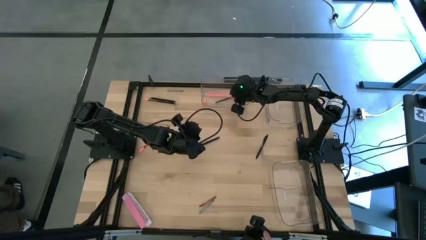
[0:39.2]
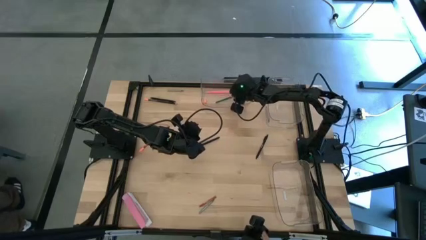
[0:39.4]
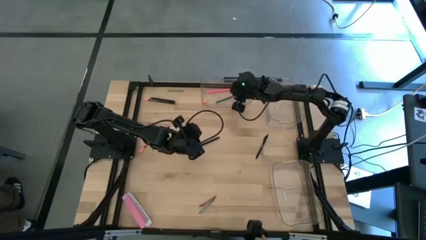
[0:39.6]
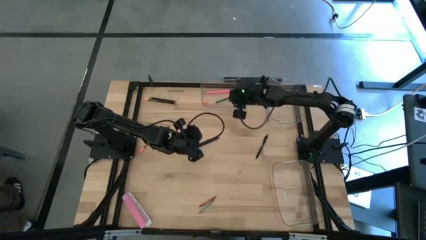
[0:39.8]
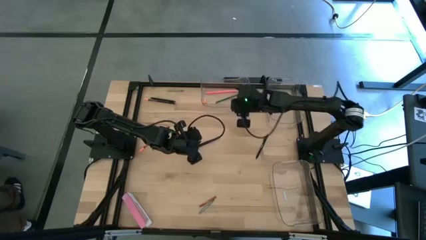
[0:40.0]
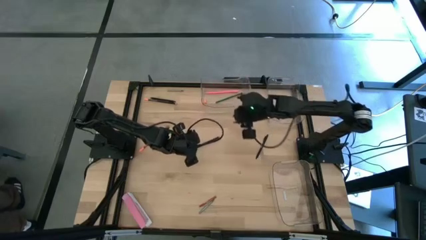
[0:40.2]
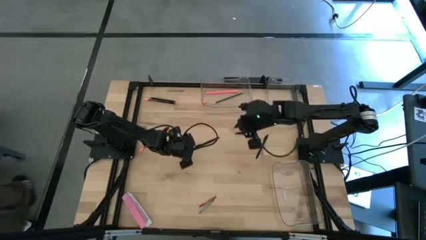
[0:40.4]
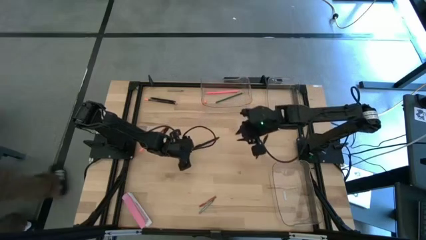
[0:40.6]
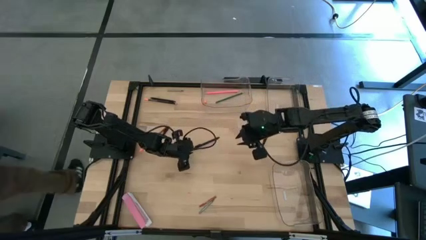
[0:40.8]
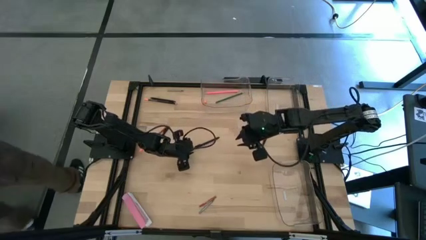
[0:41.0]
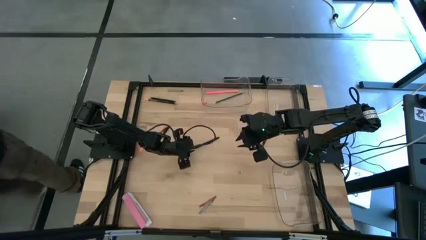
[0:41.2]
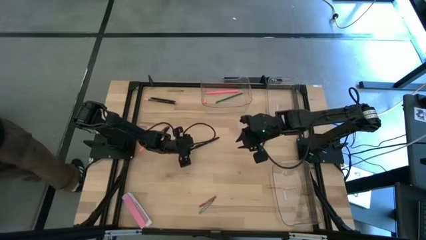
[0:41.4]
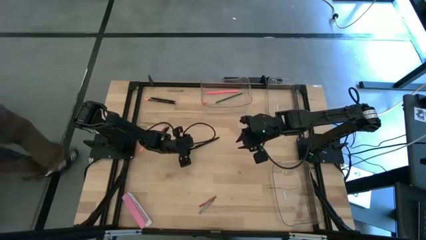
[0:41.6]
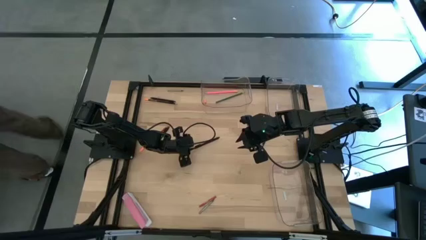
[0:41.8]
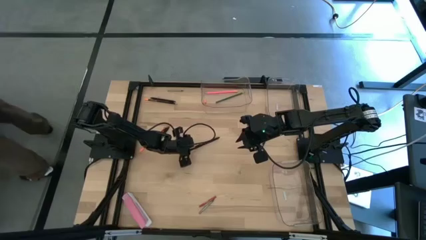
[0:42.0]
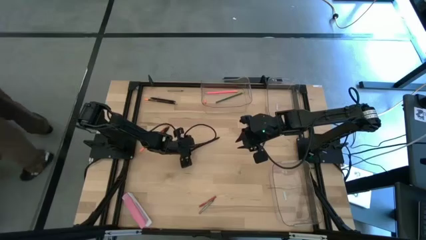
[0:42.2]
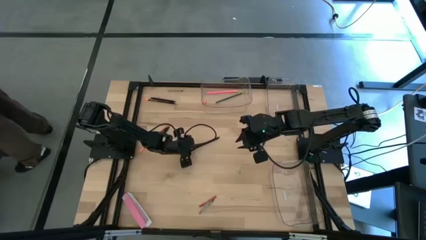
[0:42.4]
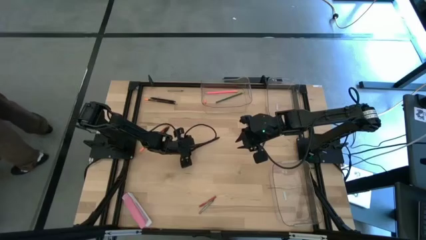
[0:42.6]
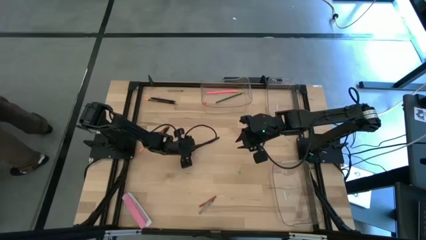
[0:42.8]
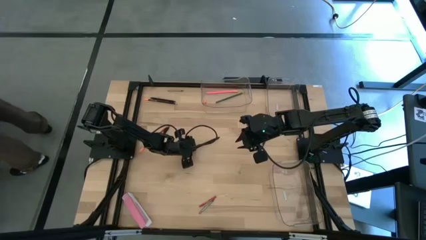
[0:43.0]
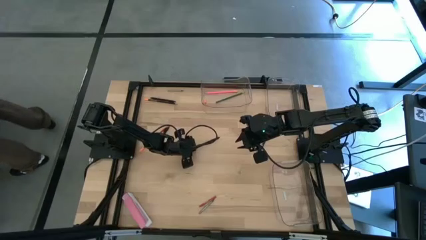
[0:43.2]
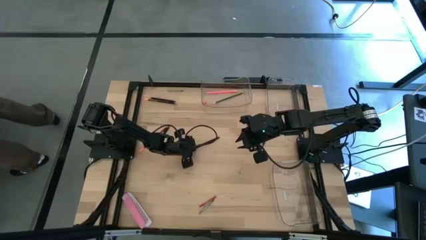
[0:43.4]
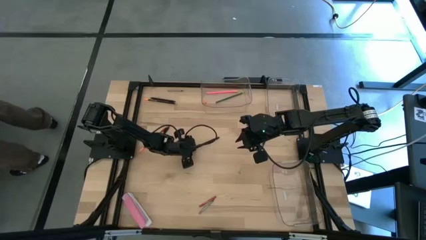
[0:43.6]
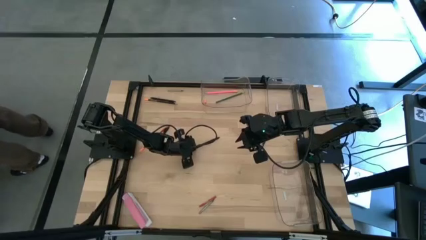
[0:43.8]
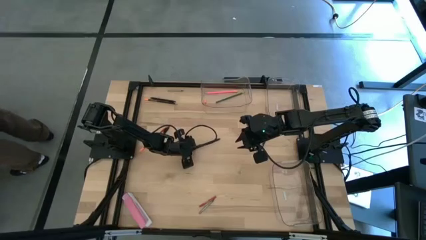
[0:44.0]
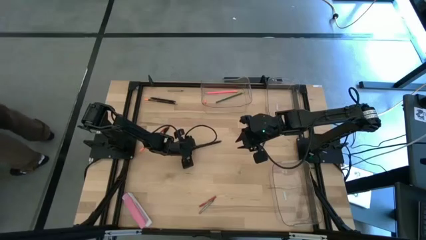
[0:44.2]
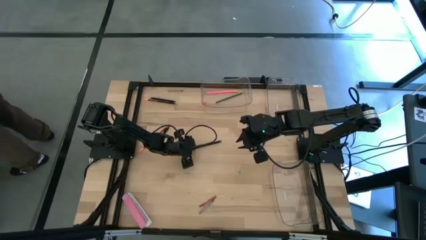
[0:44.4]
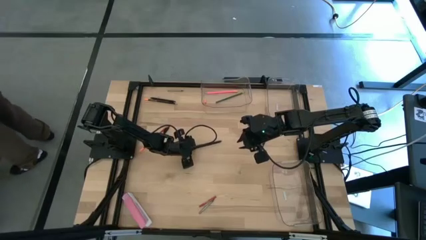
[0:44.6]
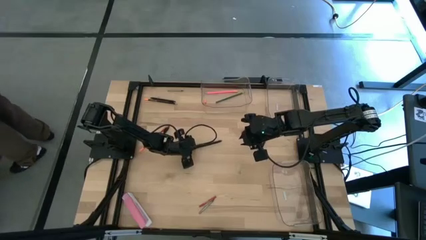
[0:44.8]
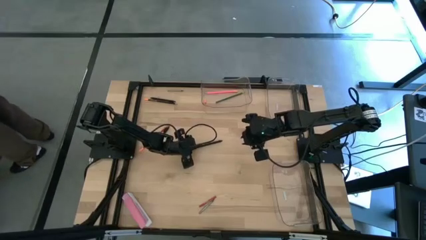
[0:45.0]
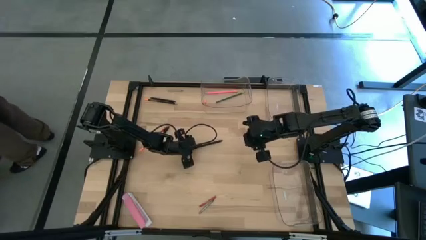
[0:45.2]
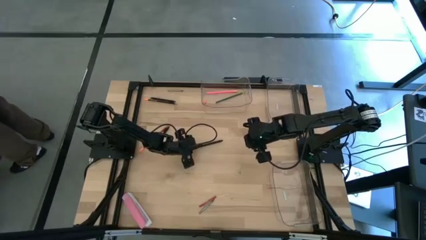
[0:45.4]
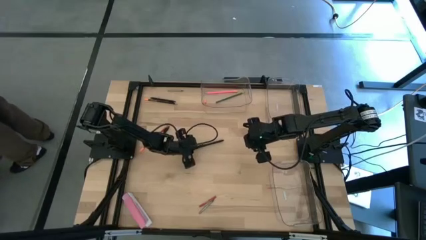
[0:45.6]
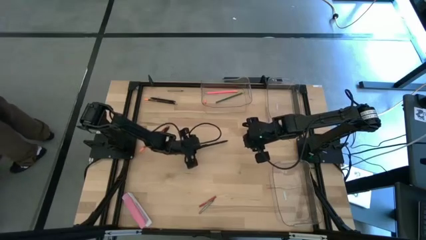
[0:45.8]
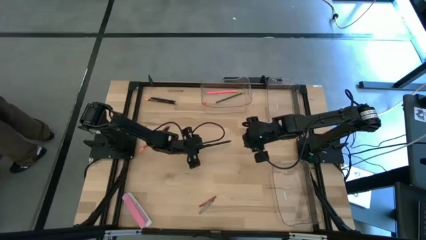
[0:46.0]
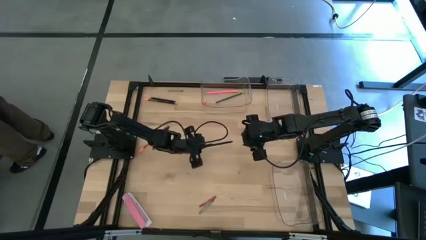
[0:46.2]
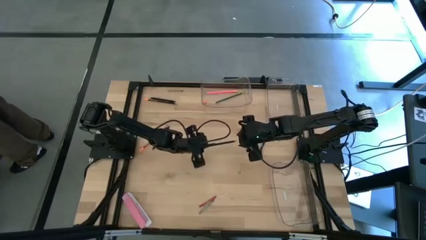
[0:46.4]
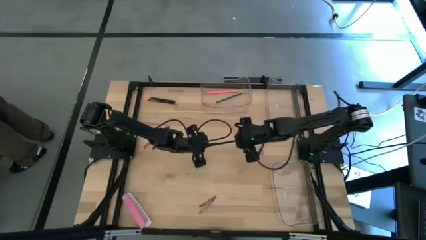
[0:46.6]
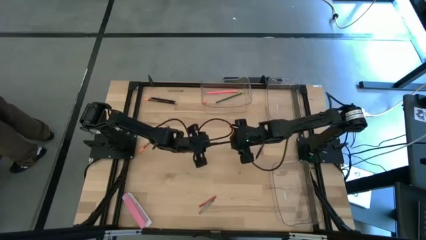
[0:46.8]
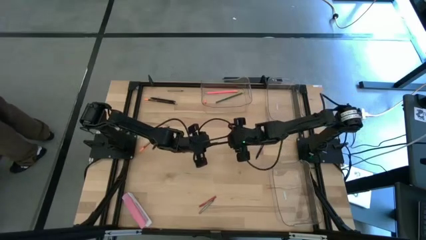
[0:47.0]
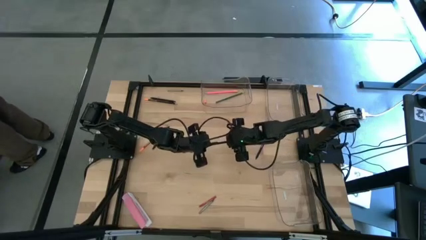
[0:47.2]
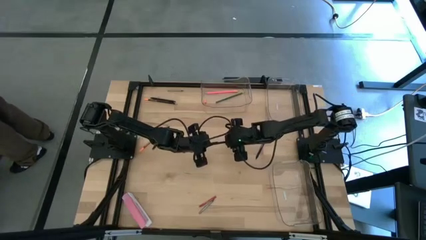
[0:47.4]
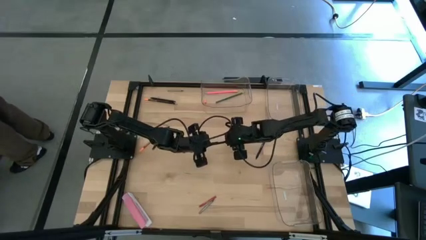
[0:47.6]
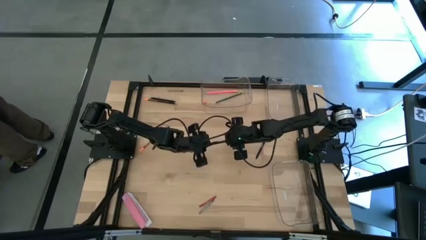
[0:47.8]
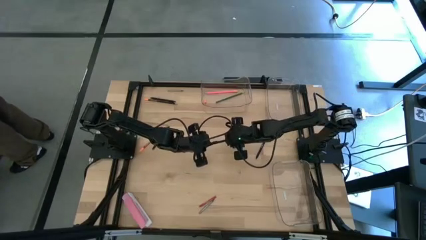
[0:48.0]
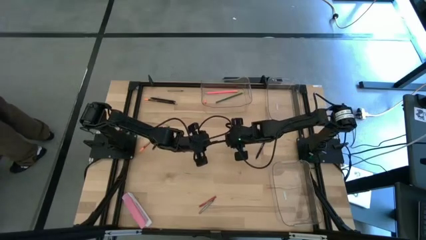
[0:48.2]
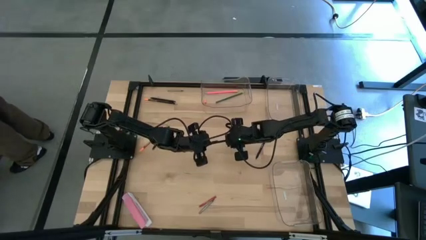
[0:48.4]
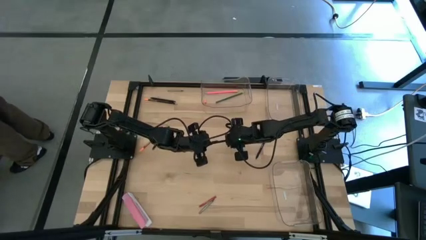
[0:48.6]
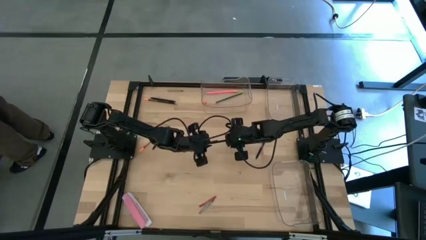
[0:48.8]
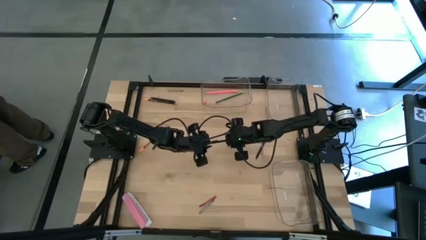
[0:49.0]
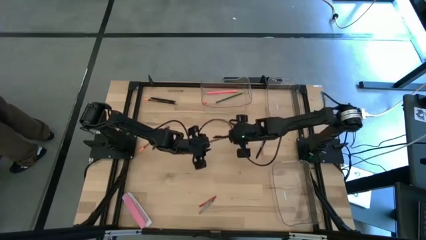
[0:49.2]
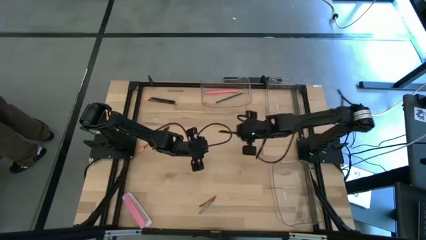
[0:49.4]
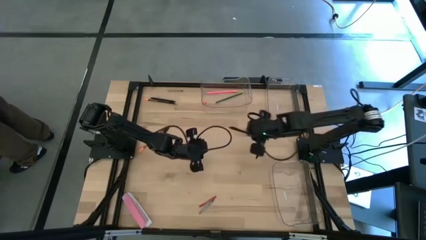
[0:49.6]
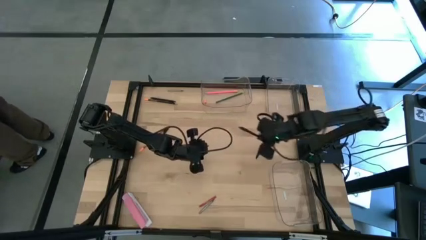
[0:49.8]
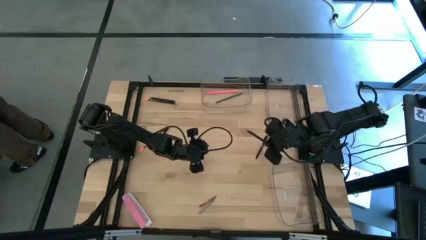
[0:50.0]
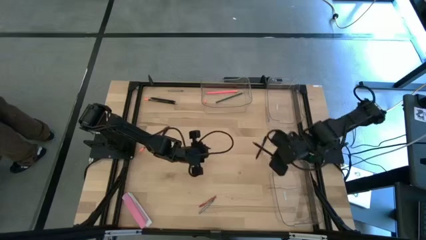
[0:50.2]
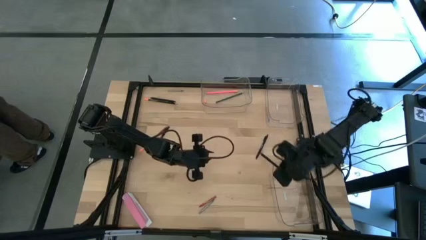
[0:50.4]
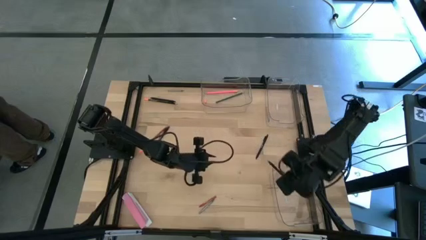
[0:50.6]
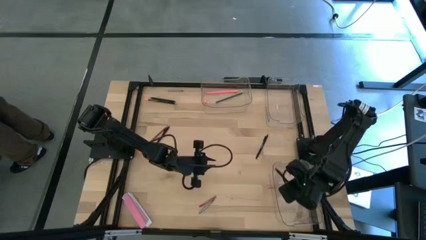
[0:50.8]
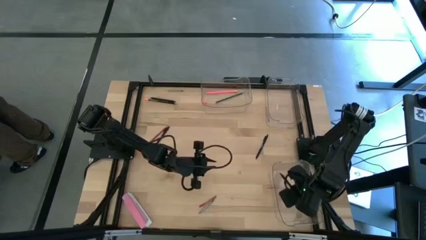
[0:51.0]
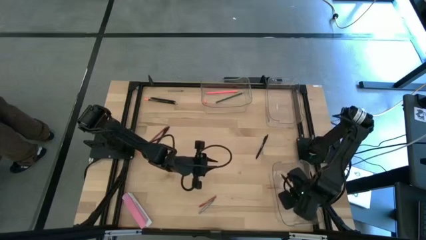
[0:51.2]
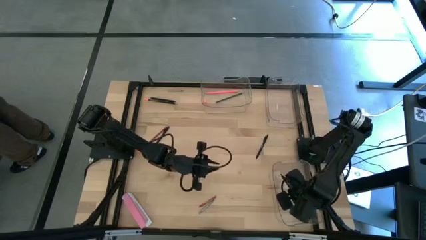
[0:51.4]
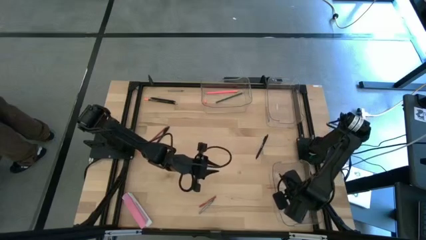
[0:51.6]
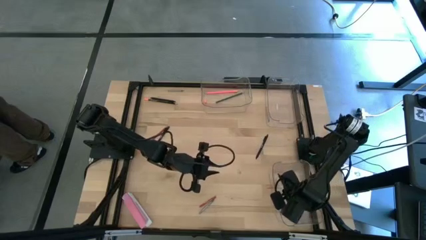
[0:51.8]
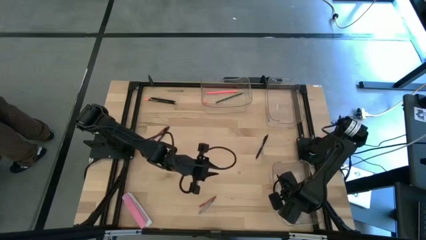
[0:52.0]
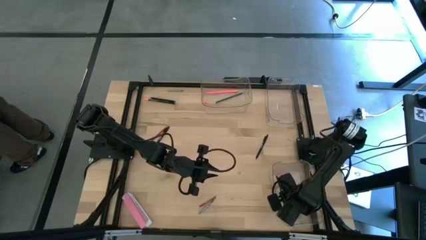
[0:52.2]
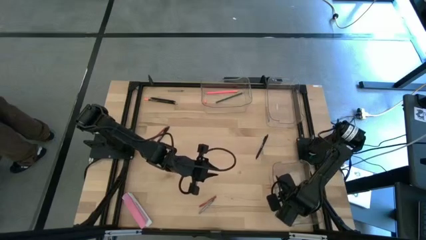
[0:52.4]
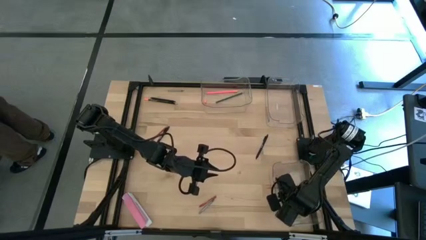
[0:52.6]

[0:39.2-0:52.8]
Task: Sort crayons/erasers/pens/pencils in bins
Put the center black pen into the bottom right transparent bin
